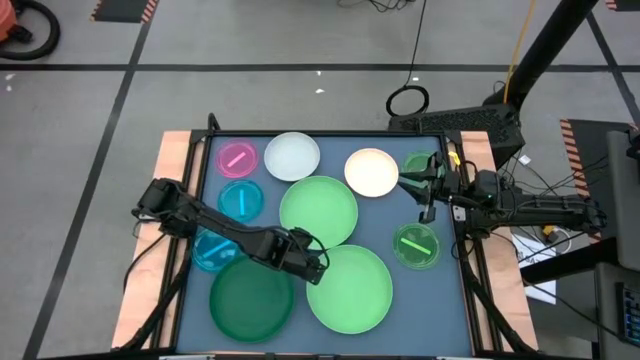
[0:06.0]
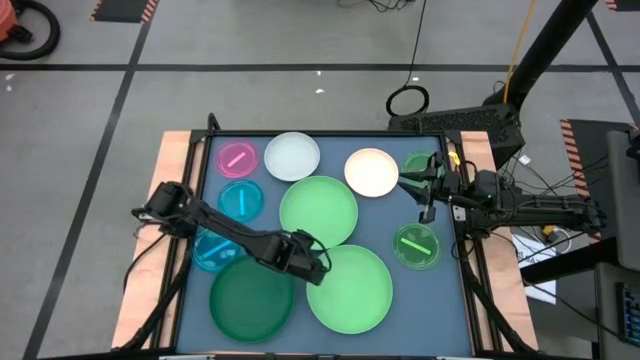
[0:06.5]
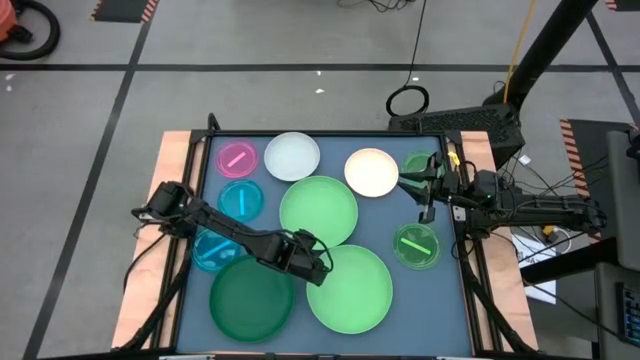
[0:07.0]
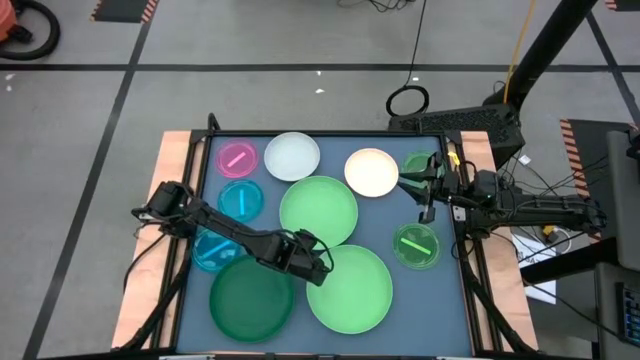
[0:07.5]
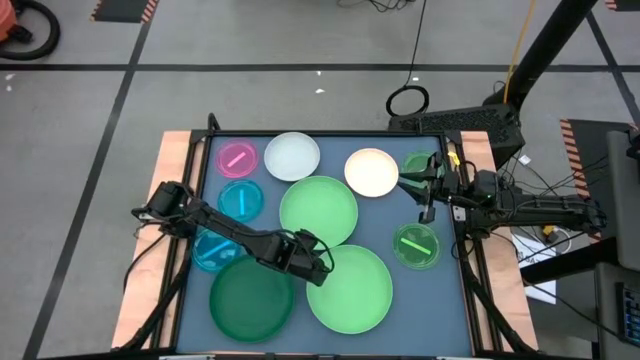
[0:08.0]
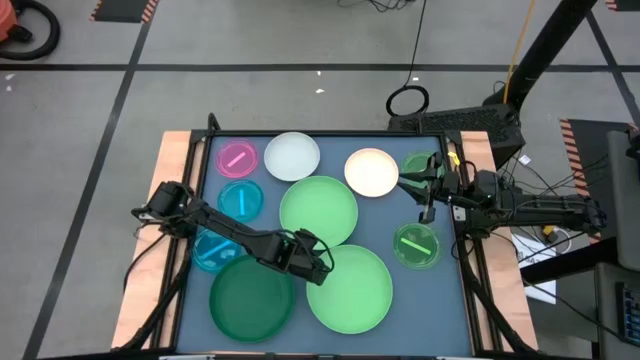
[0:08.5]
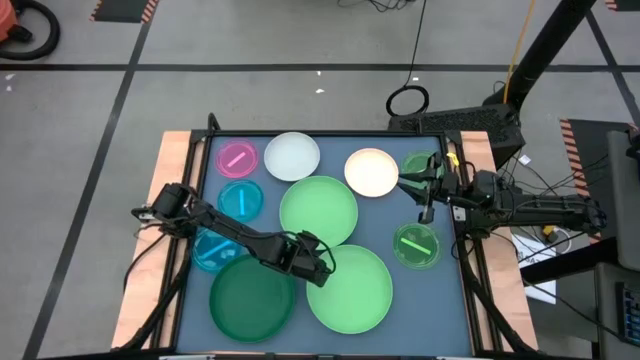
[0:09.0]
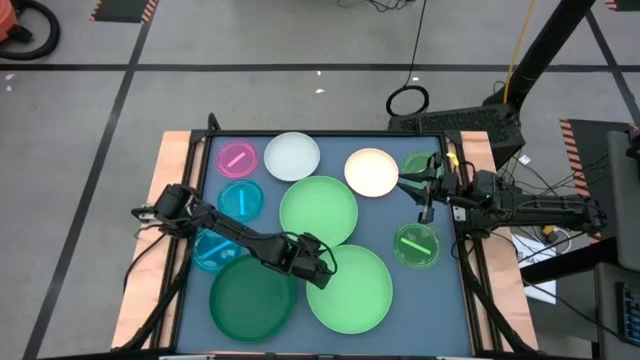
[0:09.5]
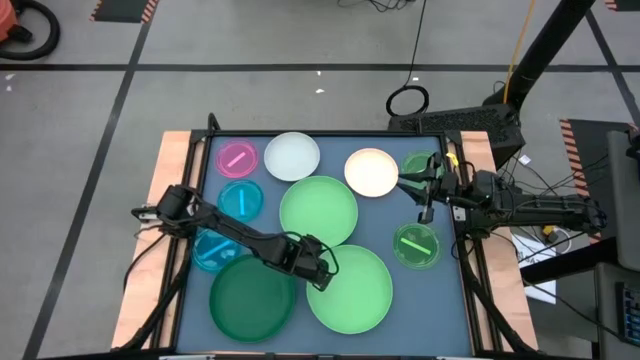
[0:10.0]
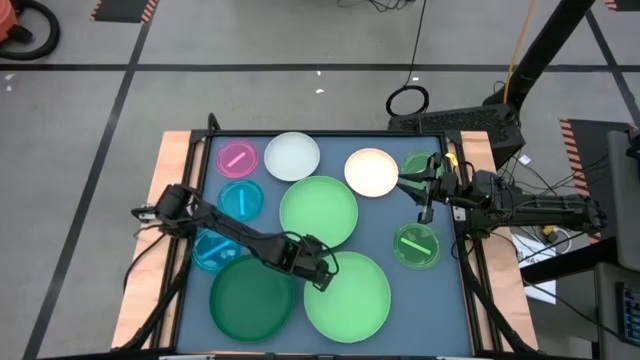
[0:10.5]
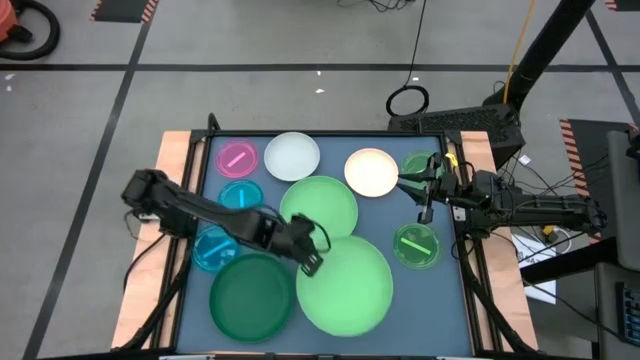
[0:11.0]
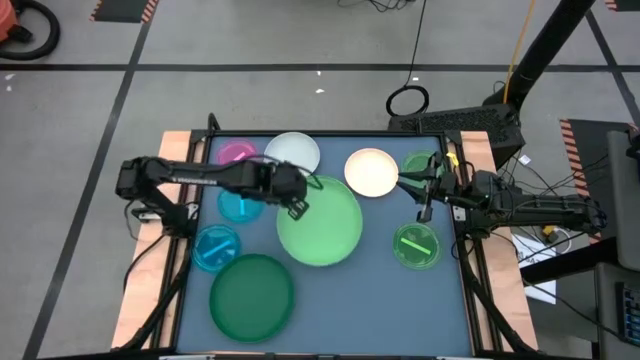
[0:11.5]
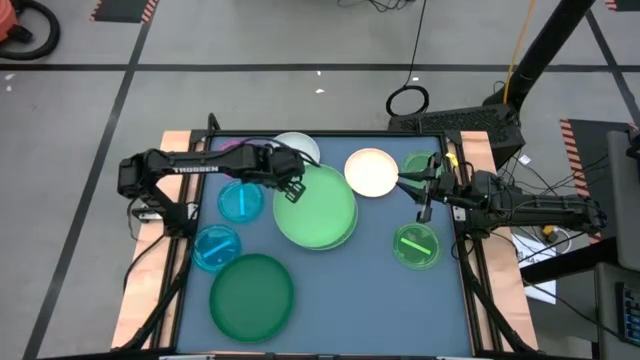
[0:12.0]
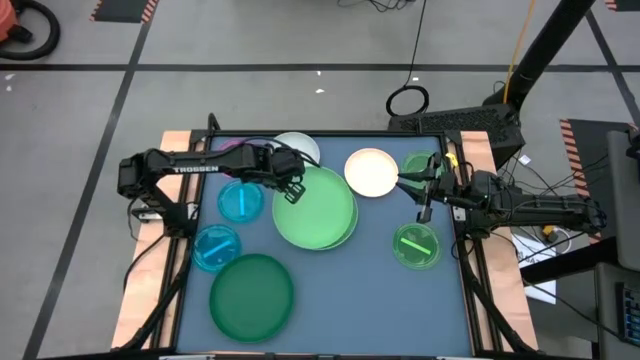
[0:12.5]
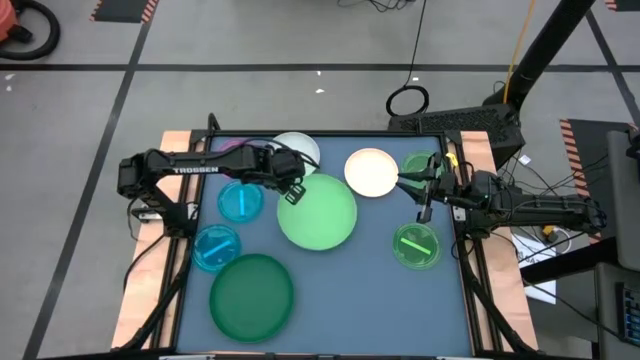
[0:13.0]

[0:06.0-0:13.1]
Task: Stack plastic plates
Stack the bottom light green plate on top of the top light green plate

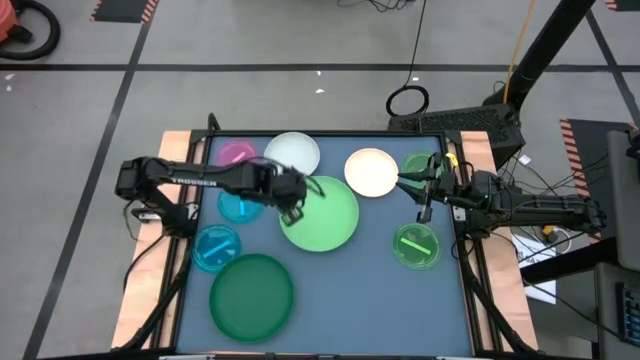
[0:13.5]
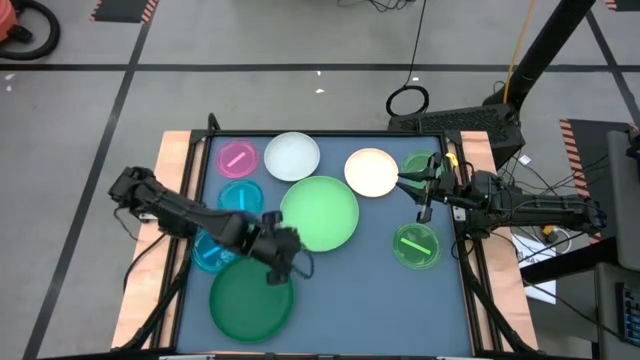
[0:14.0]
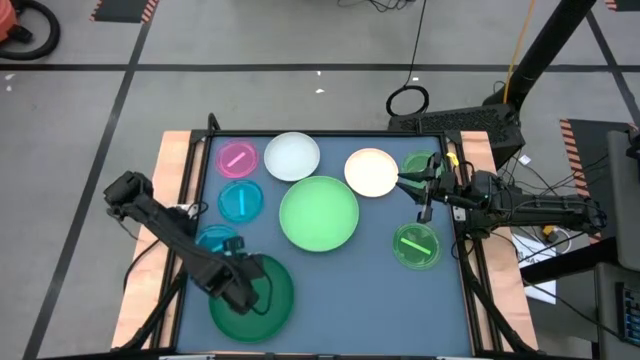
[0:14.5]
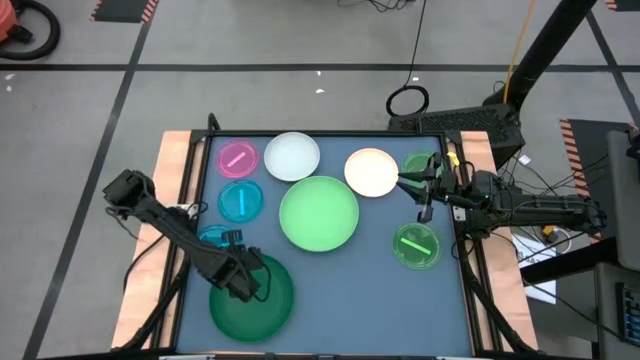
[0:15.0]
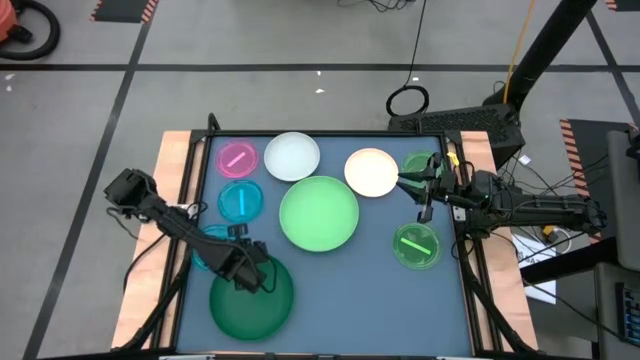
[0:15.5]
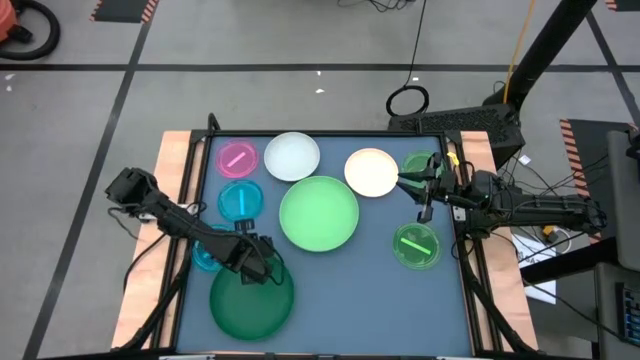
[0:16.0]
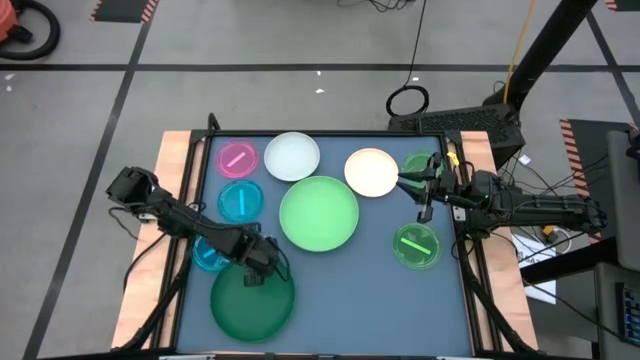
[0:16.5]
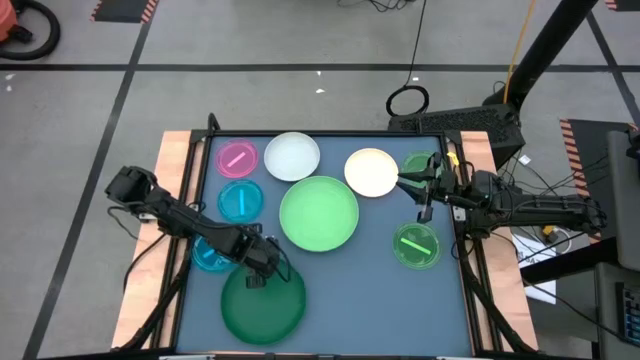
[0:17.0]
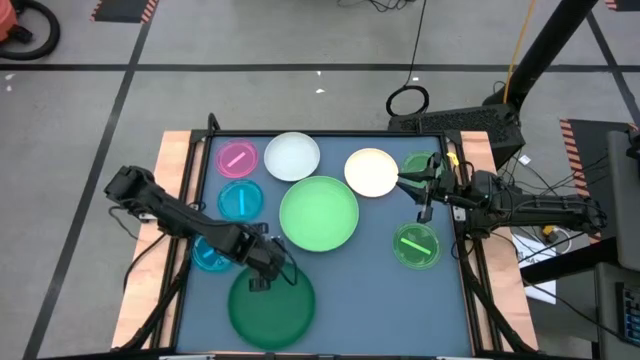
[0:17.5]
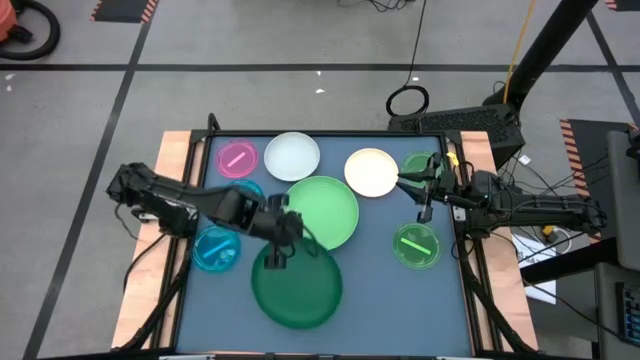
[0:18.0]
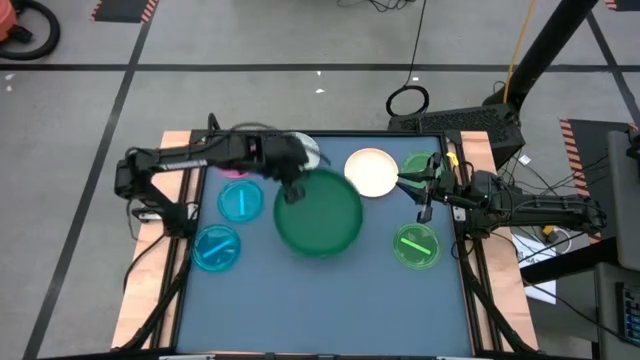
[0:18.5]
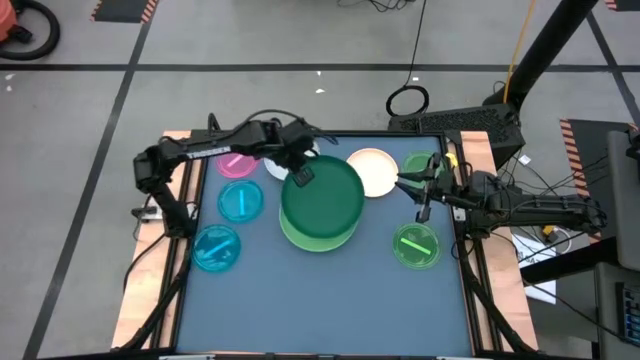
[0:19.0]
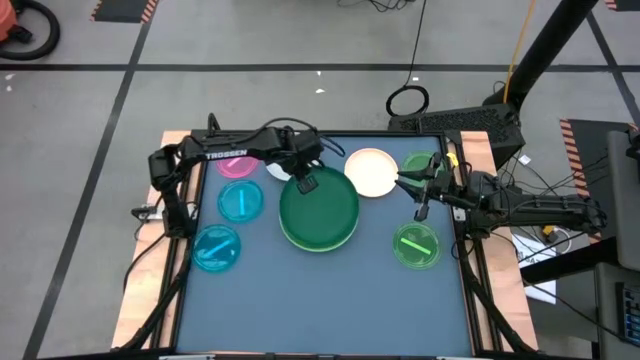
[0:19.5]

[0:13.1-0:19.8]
Stack the green plate on top of the light green plate

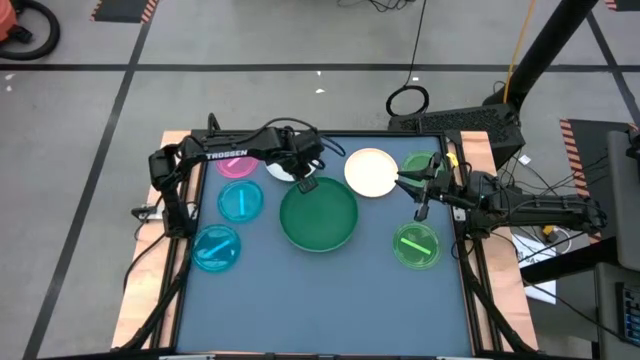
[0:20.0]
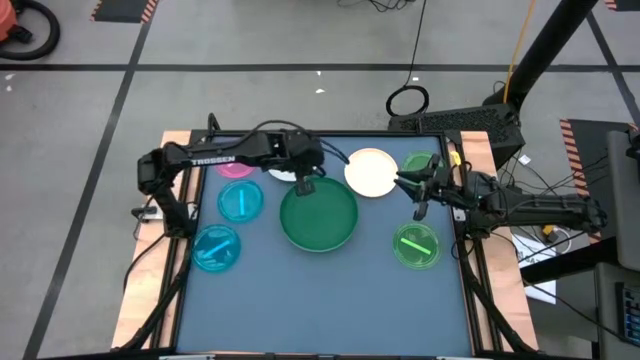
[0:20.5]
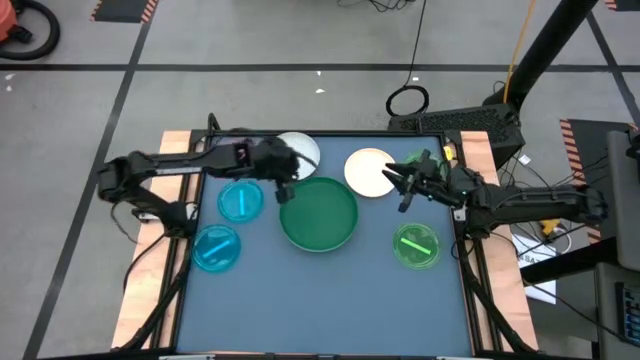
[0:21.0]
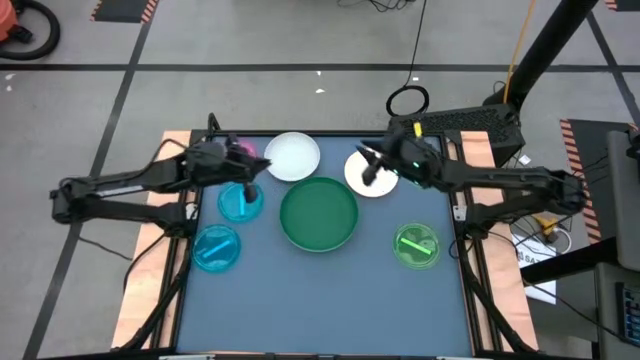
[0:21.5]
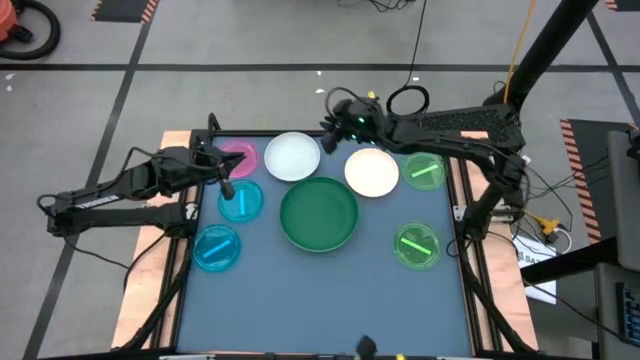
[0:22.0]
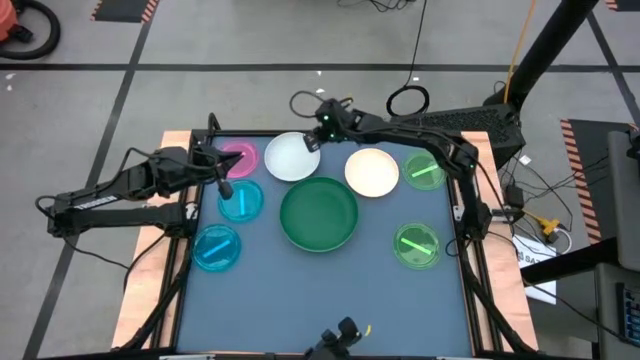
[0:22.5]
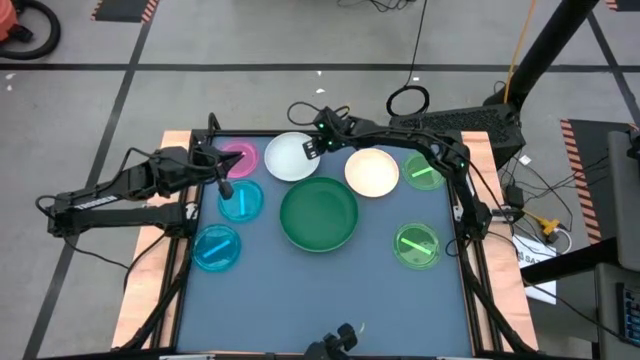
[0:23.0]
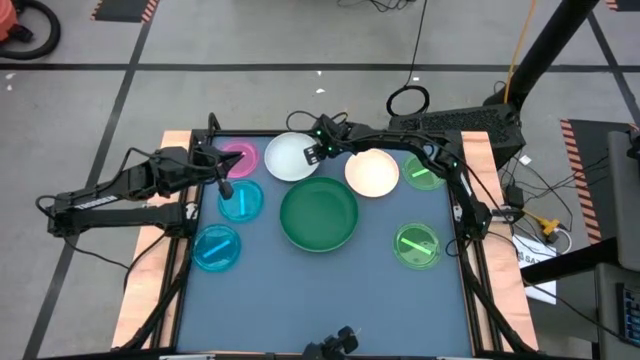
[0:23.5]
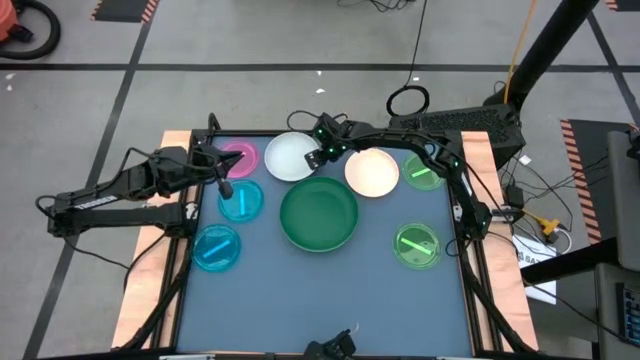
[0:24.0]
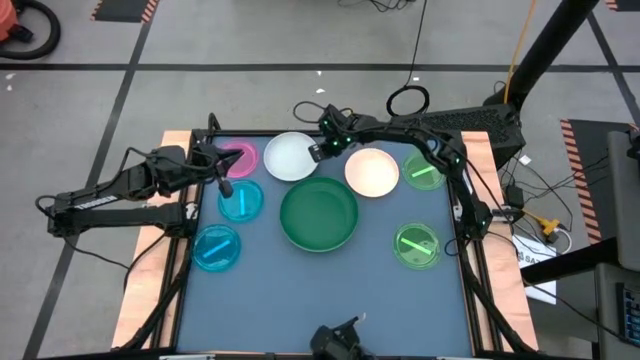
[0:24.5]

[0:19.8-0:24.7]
Stack the gray plate on top of the green plate

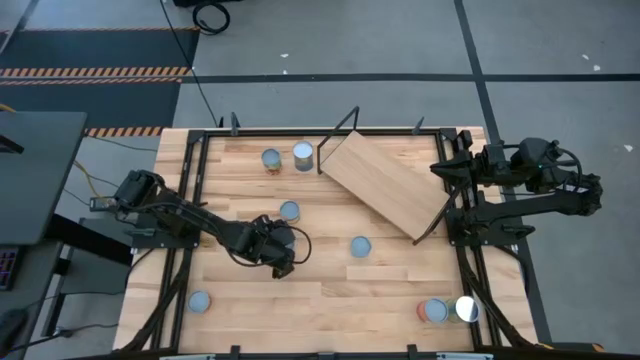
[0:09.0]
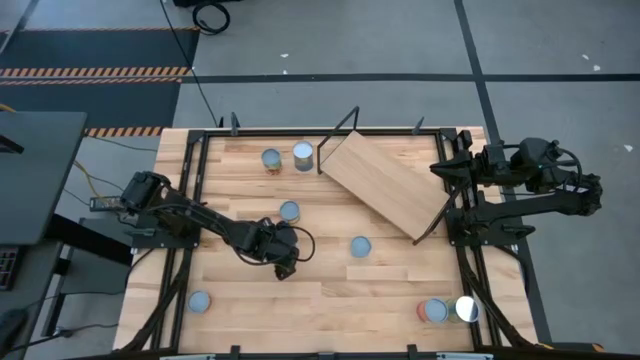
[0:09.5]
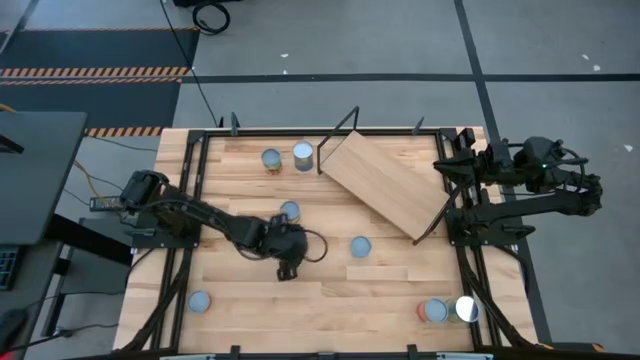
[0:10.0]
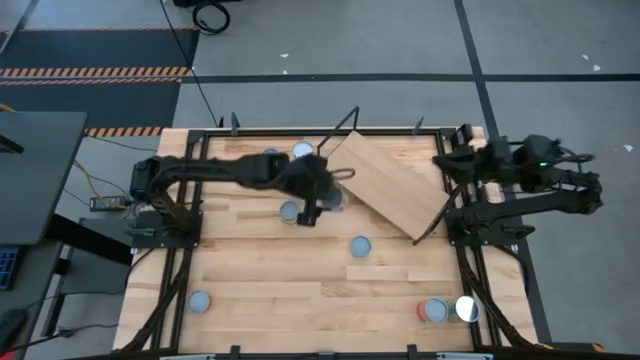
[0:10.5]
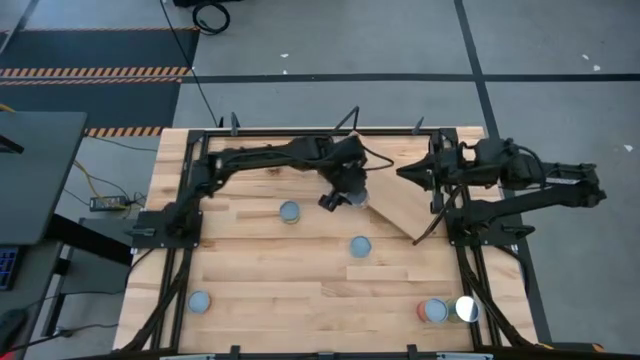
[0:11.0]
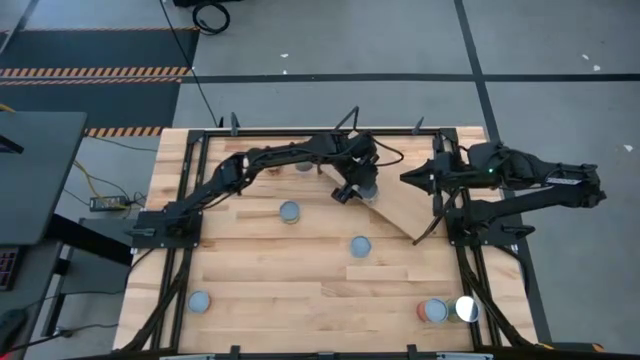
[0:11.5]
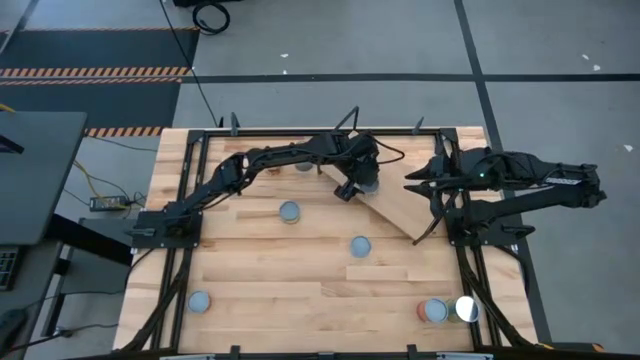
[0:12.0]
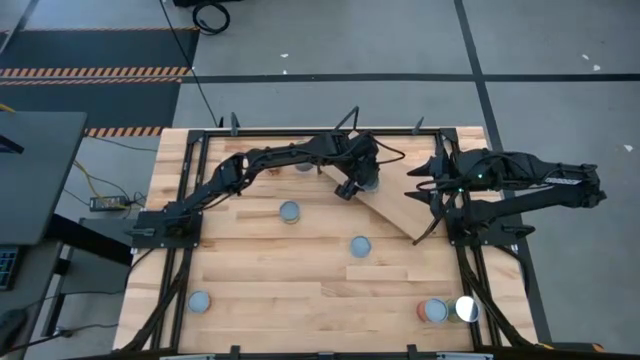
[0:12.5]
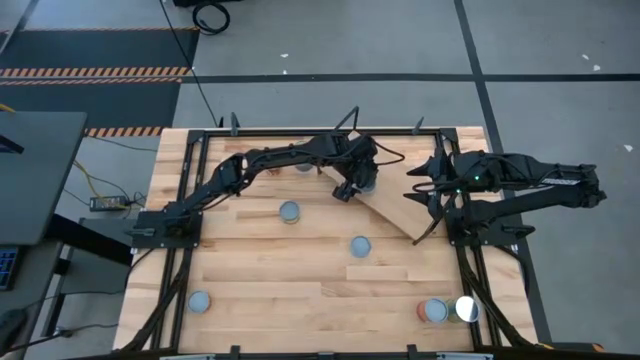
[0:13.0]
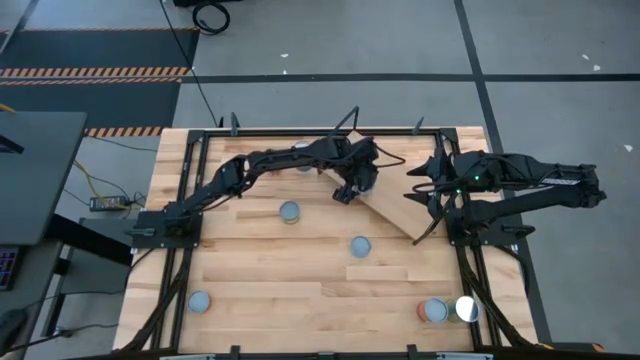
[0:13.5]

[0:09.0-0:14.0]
Task: Pick and place cans onto a shelf
Put the canned diced tomatoes on the shelf
